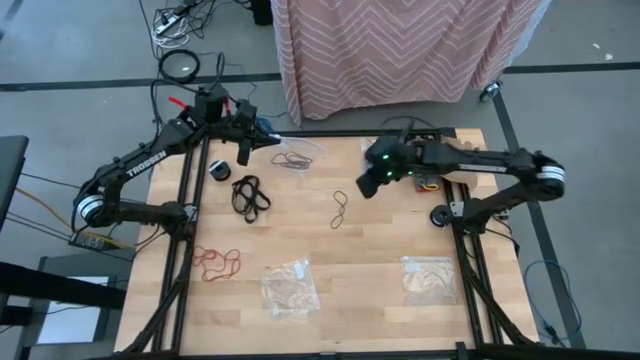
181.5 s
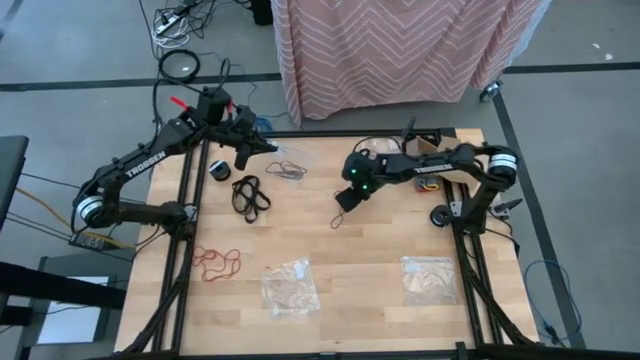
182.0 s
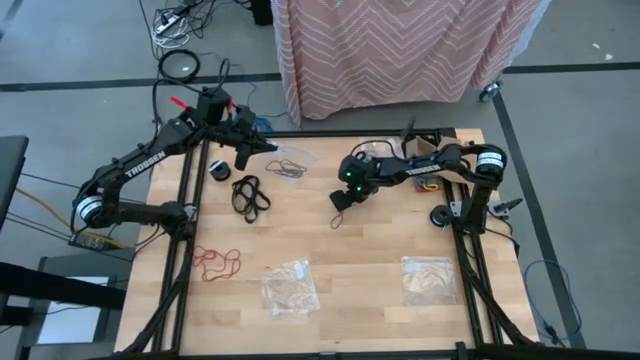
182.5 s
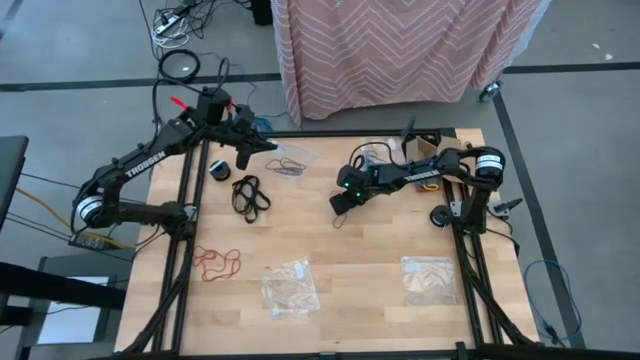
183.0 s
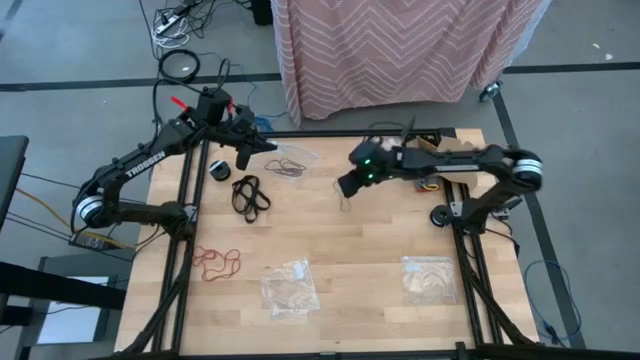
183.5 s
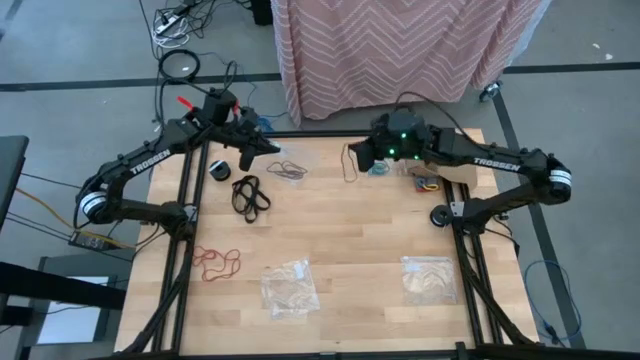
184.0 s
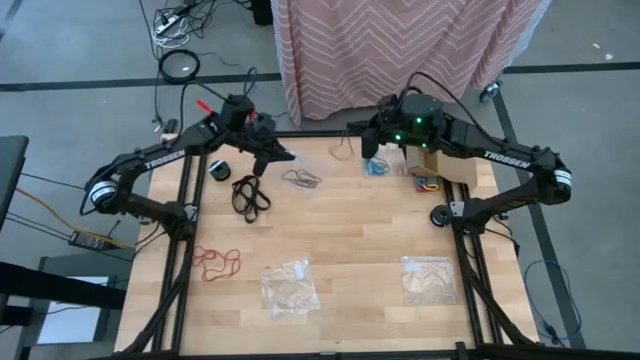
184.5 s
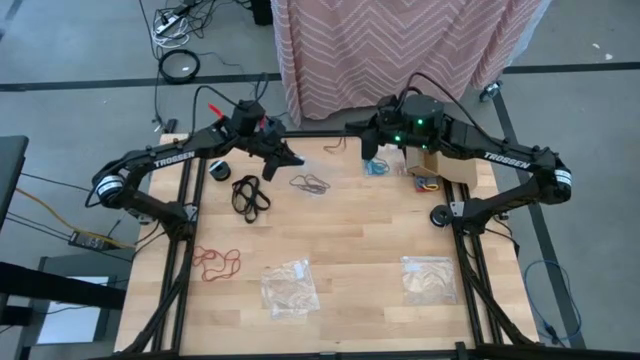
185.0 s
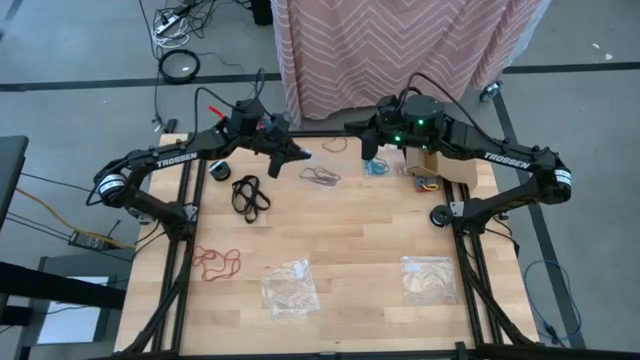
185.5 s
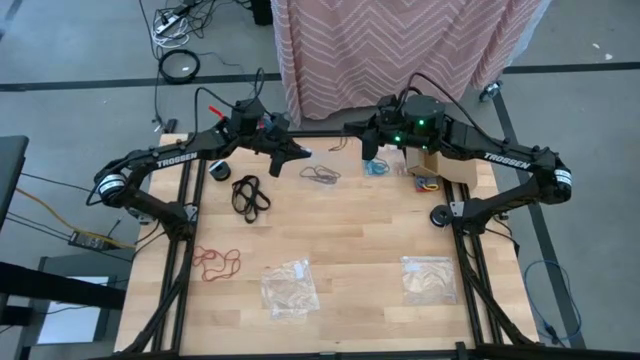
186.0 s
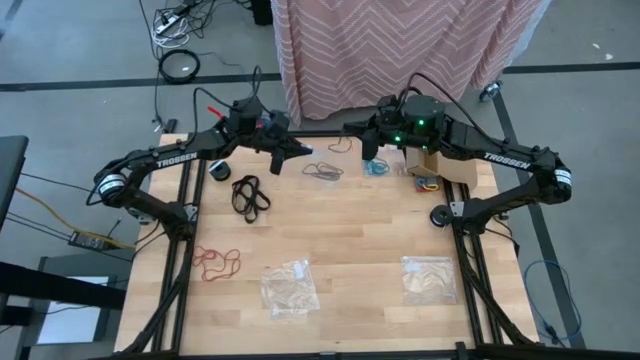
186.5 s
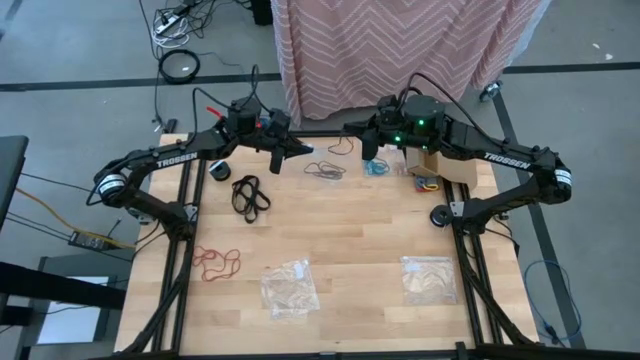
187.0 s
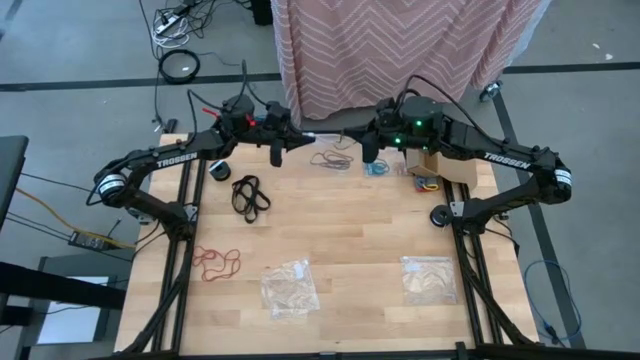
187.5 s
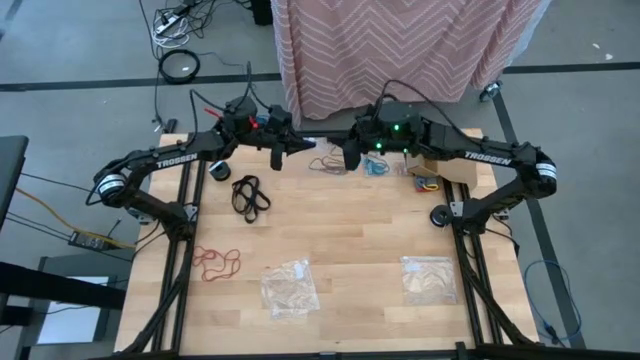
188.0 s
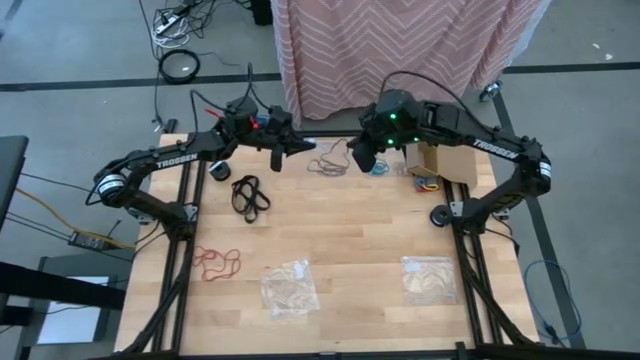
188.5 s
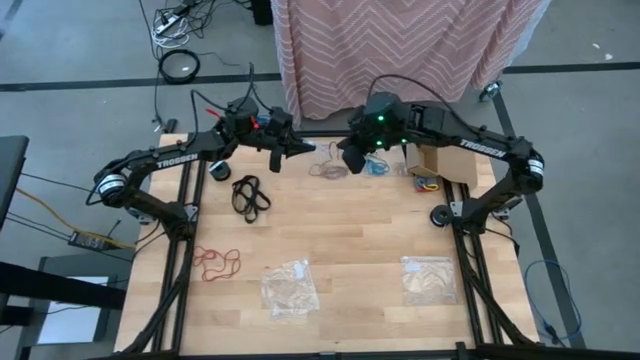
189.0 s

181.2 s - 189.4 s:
Task: Sort rubber bands
Put the black rubber band into the bottom center transparent zip bag

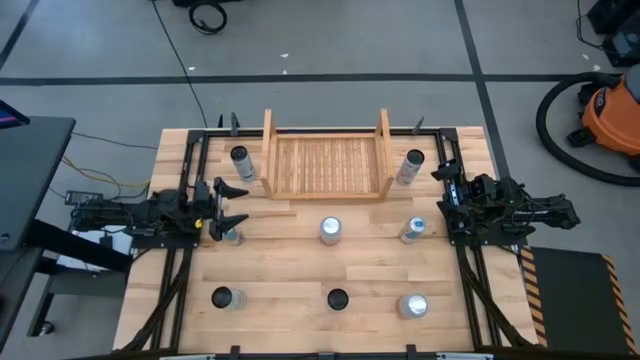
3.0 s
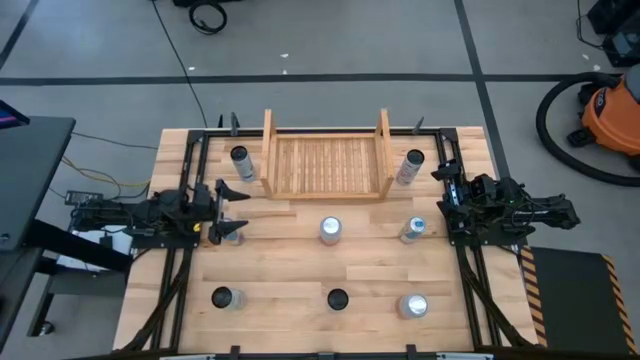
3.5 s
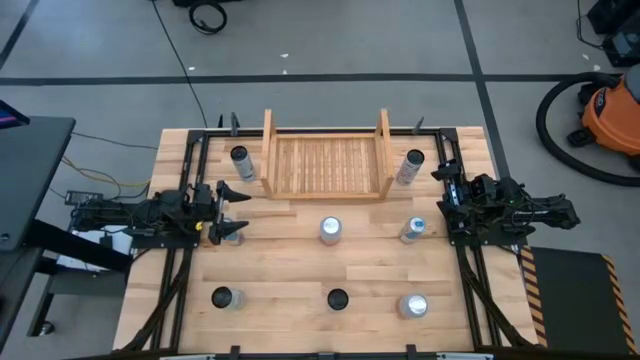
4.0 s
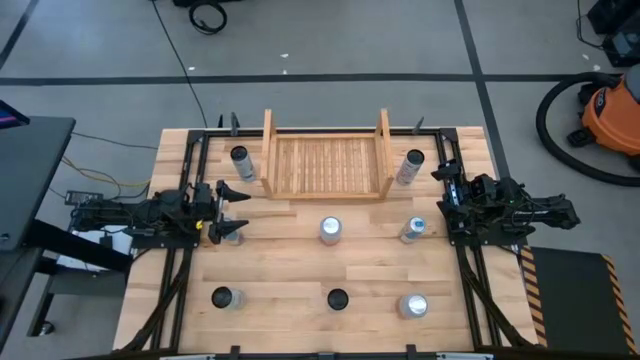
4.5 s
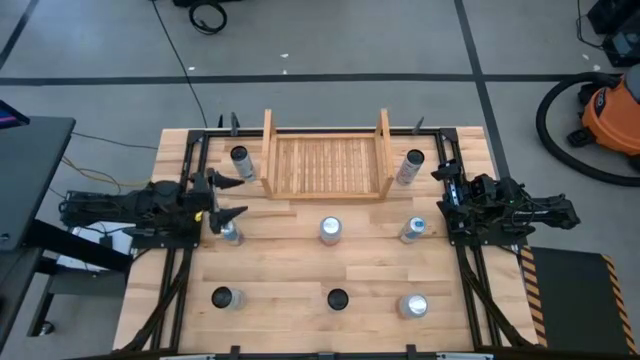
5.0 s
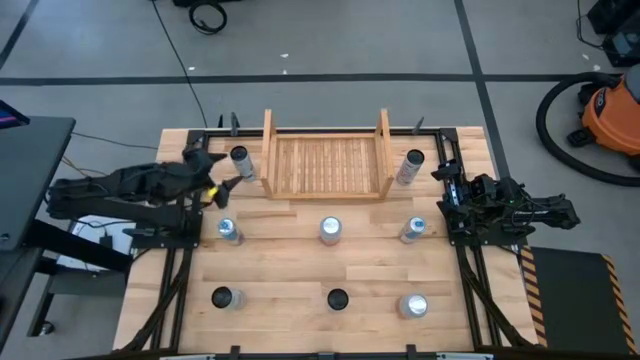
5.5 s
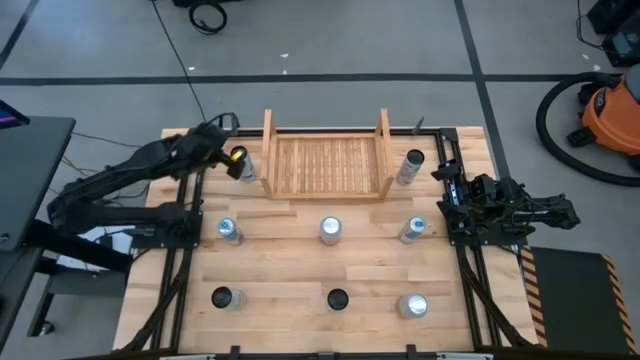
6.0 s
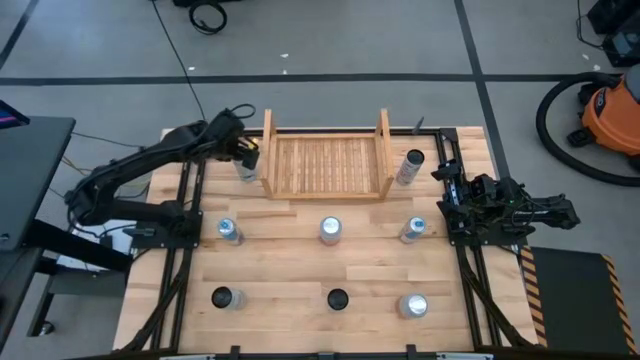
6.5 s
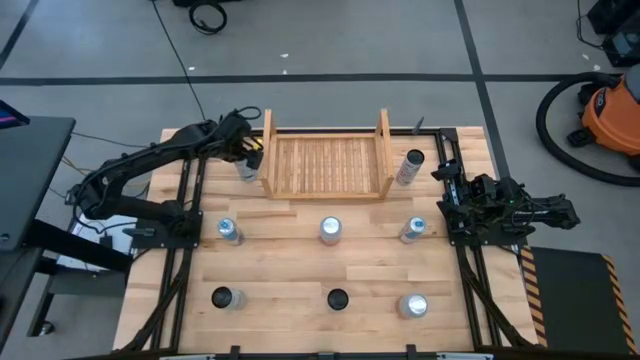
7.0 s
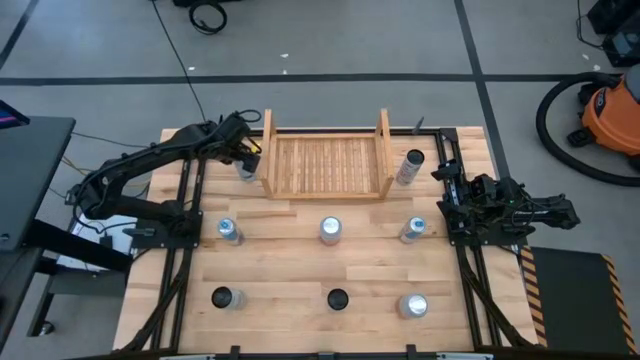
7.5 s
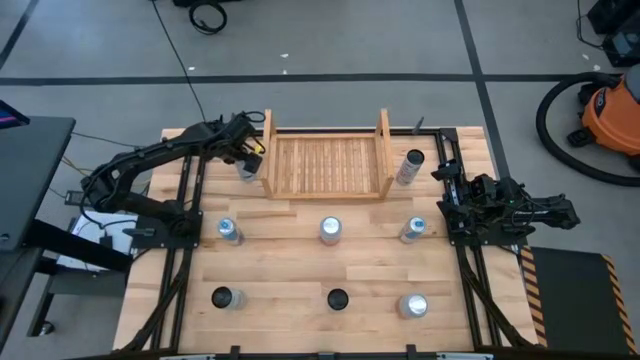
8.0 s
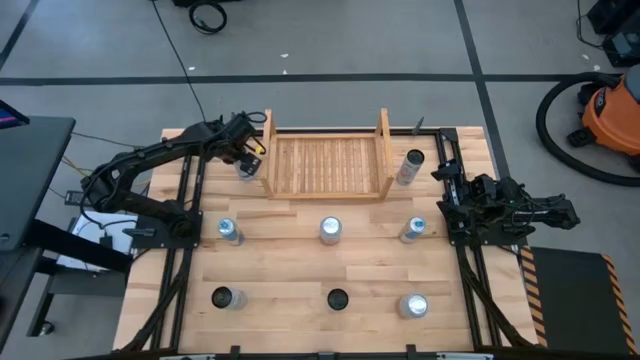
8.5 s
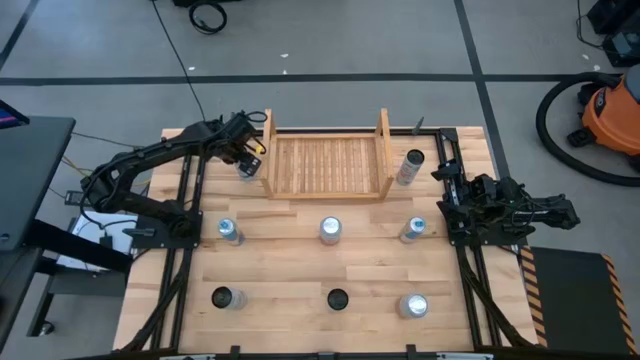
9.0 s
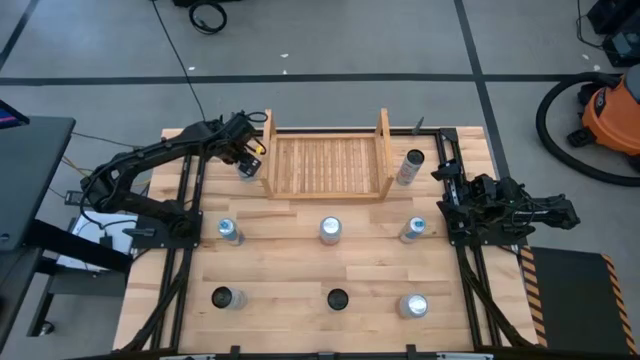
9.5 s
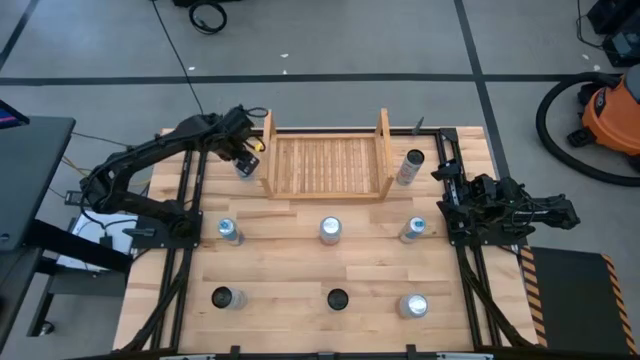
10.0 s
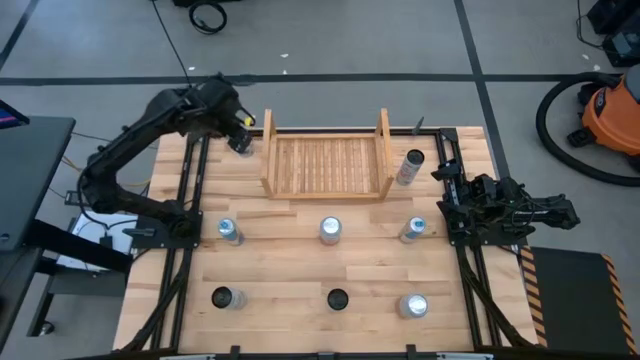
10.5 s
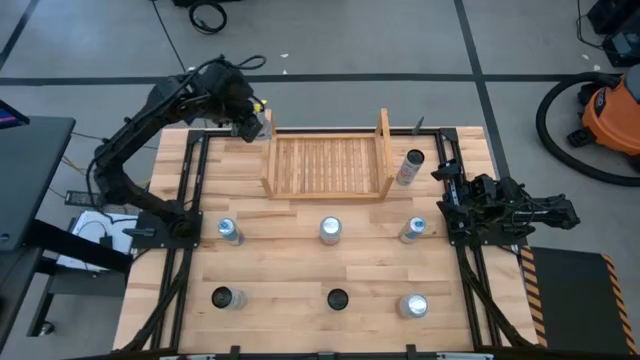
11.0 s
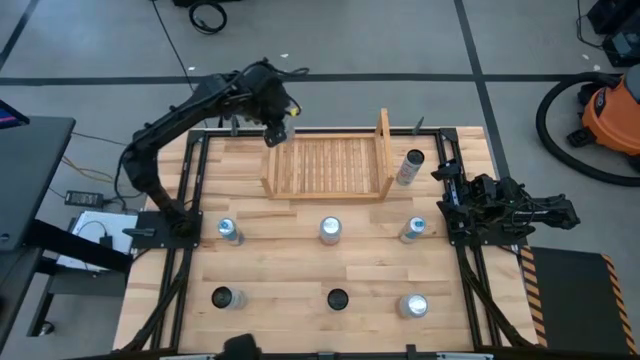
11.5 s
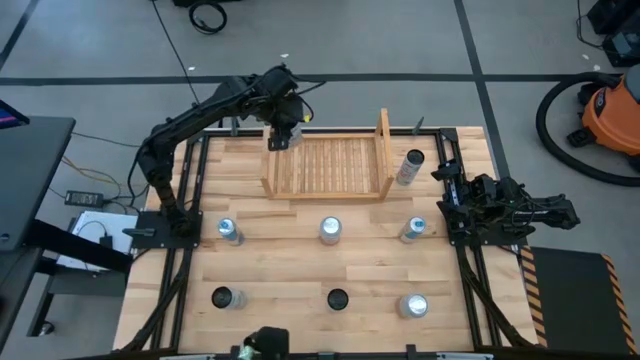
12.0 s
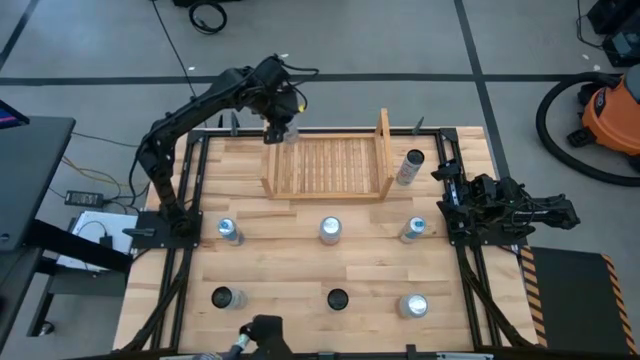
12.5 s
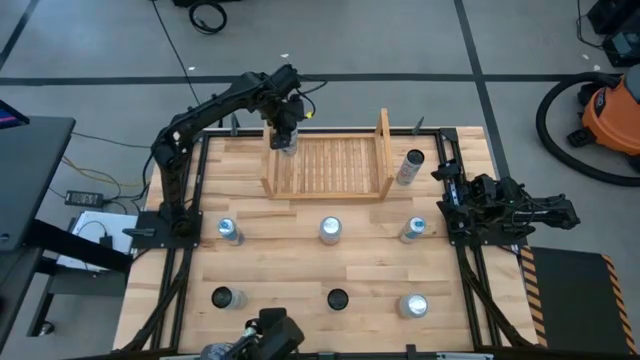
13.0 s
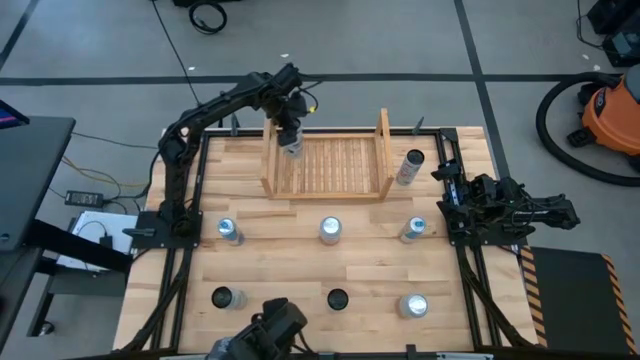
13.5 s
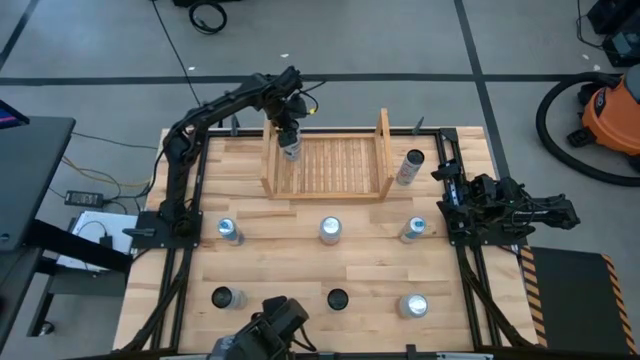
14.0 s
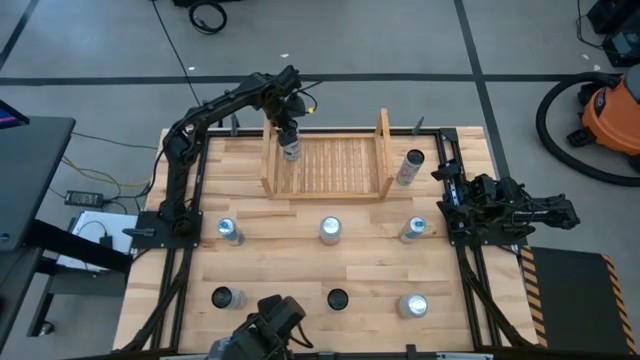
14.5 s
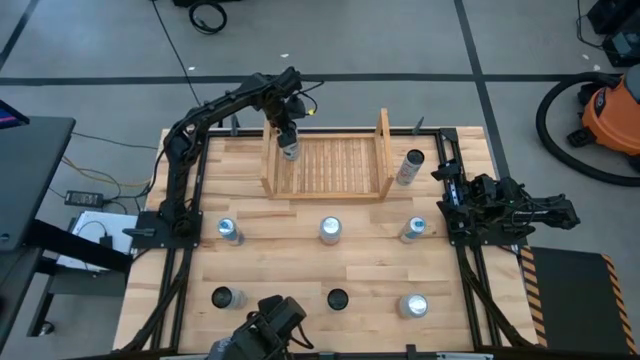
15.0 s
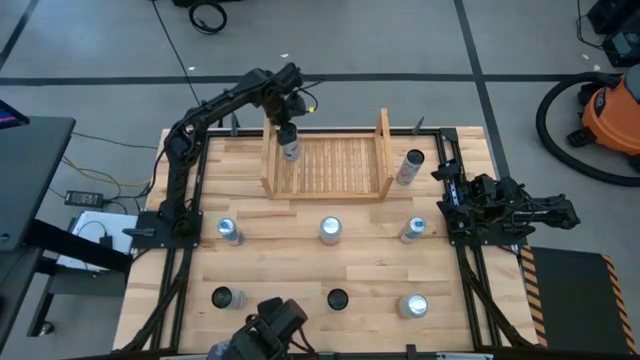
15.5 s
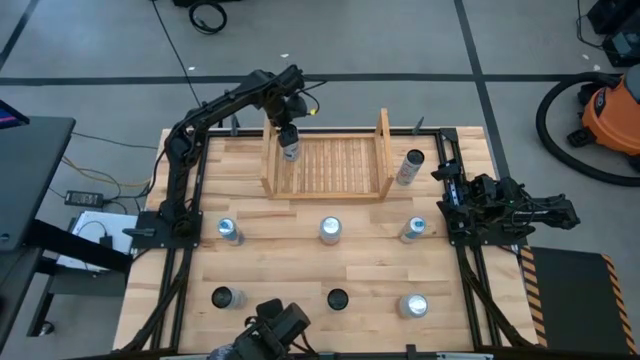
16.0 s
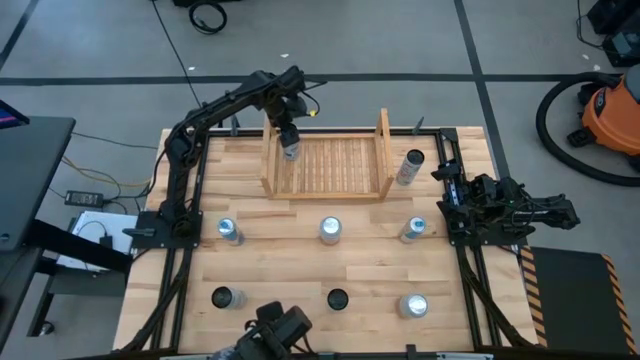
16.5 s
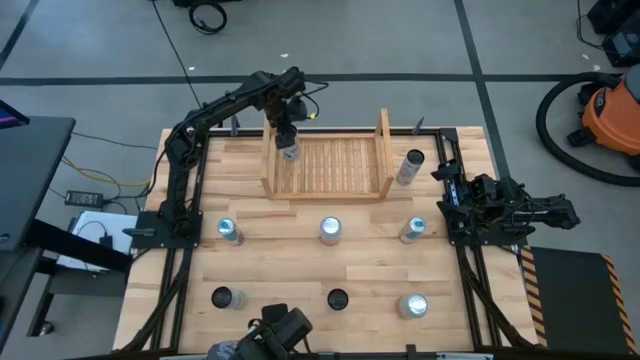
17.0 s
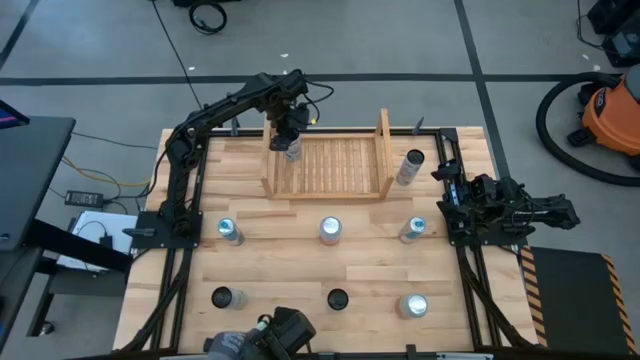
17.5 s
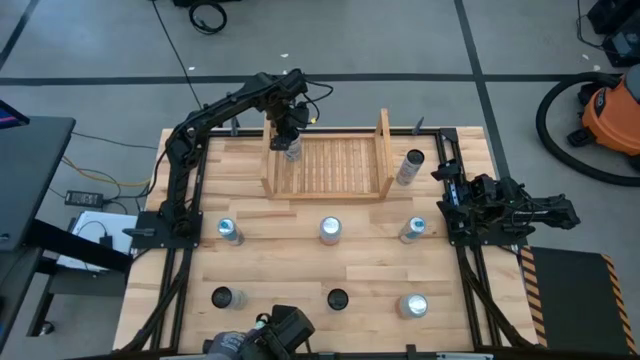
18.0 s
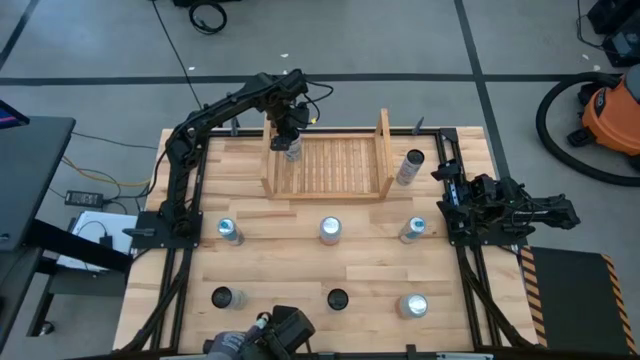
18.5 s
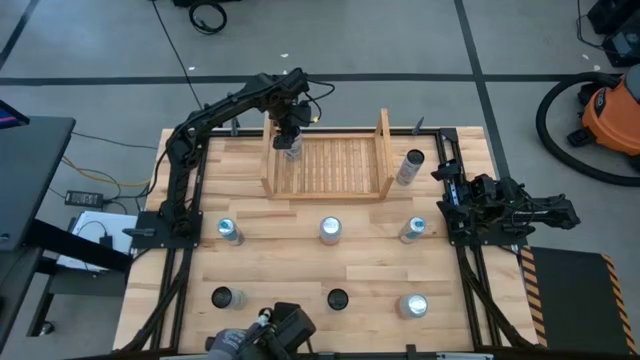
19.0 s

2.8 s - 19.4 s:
Task: Place canned beverage on shelf
Put the top white soda can into the shelf
